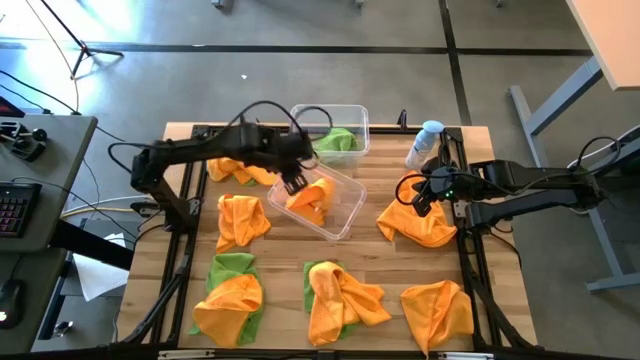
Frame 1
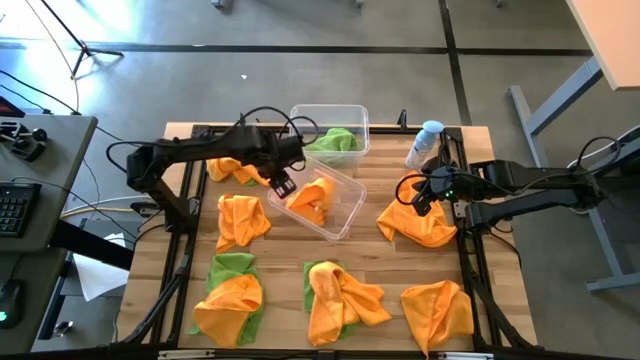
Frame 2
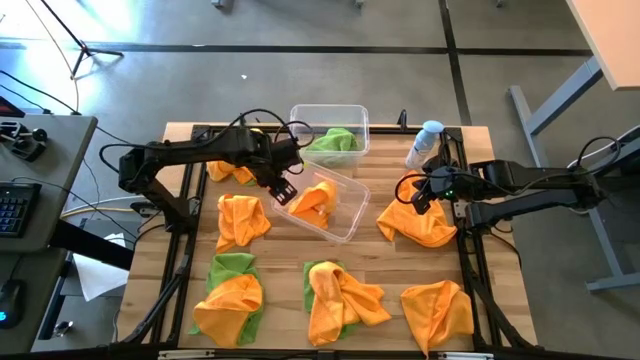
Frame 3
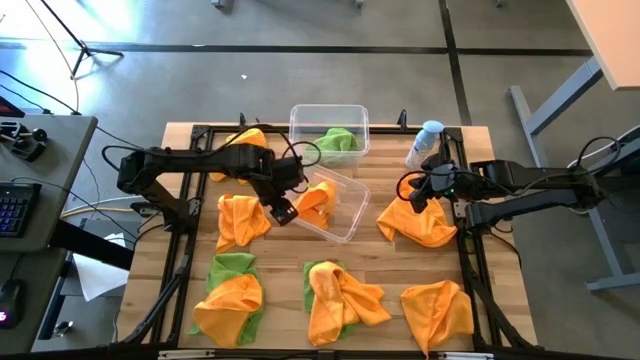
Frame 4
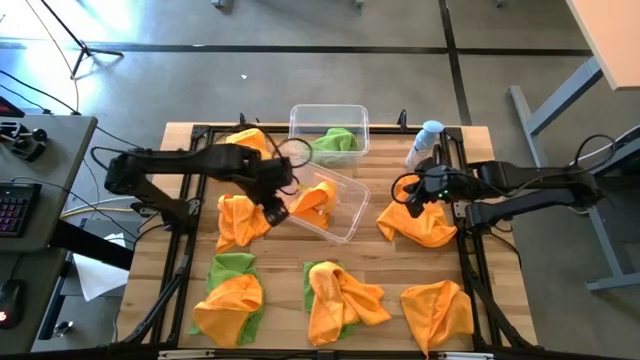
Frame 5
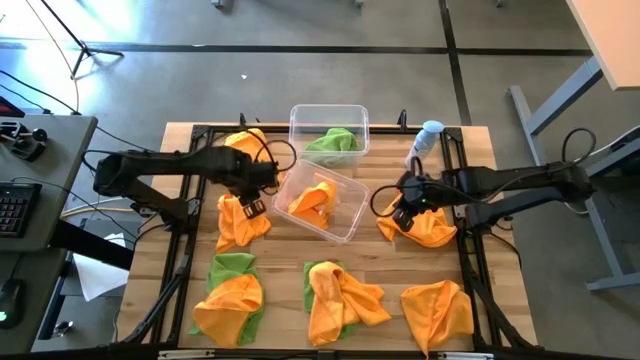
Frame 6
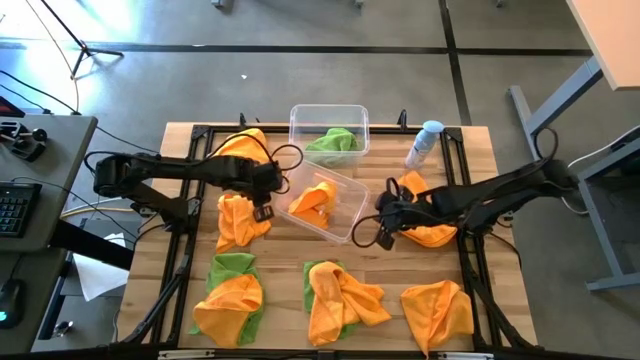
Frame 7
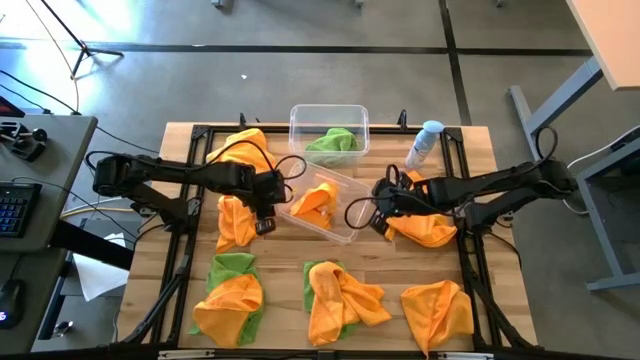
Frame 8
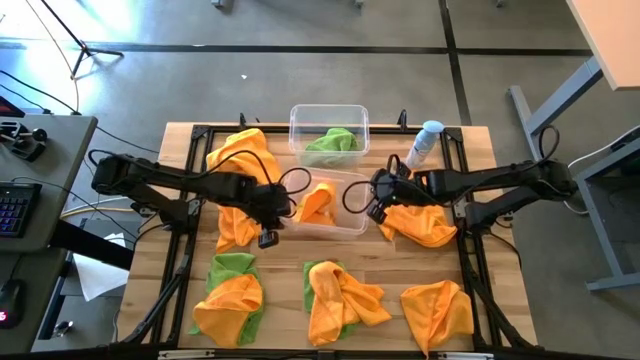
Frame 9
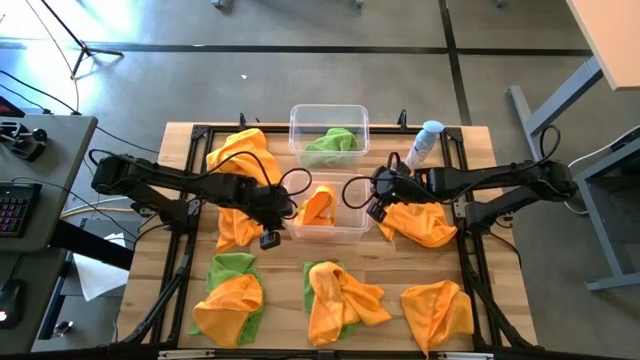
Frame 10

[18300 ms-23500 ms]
Task: Sort microfiber towel by color & place in baskets
Adjust the bottom transparent bin on the table

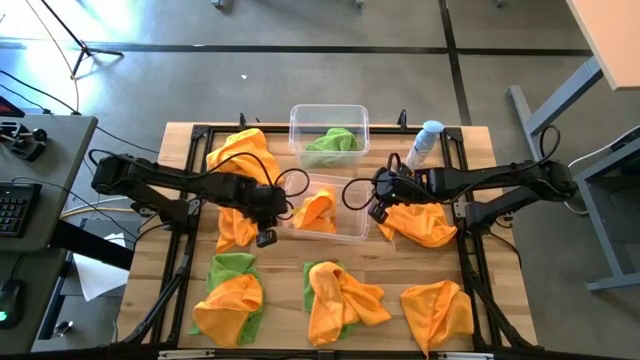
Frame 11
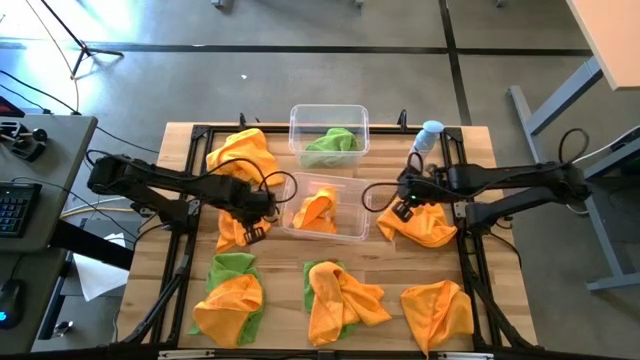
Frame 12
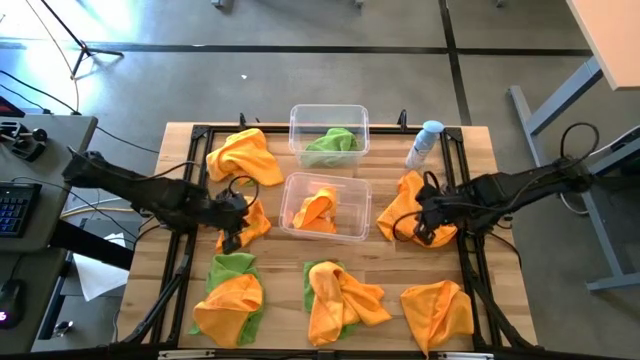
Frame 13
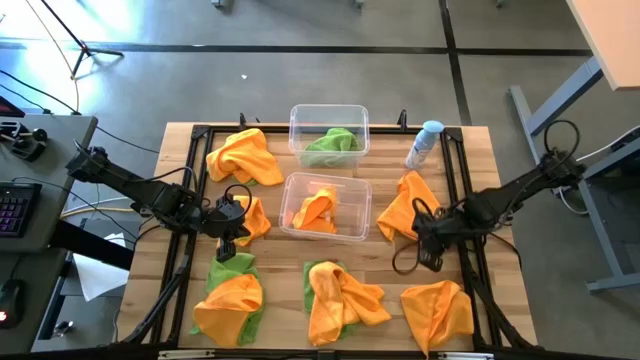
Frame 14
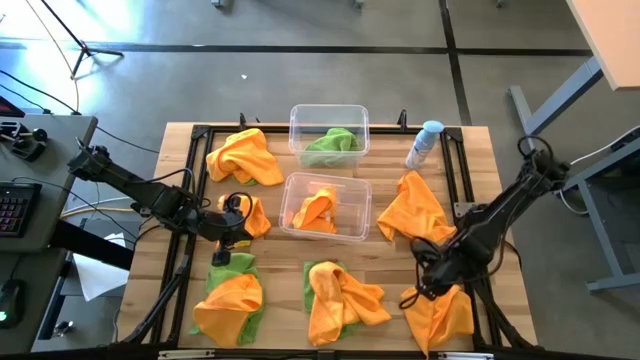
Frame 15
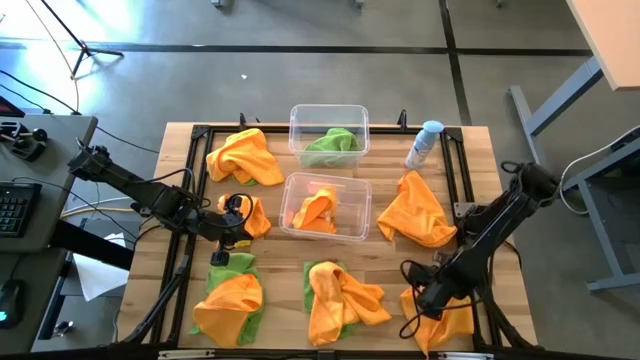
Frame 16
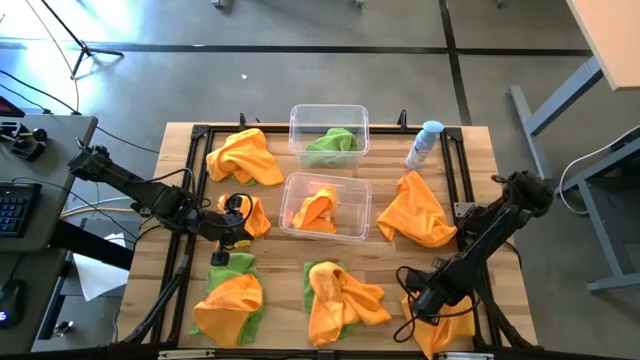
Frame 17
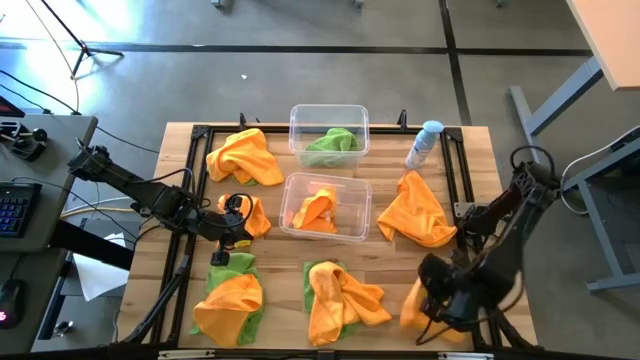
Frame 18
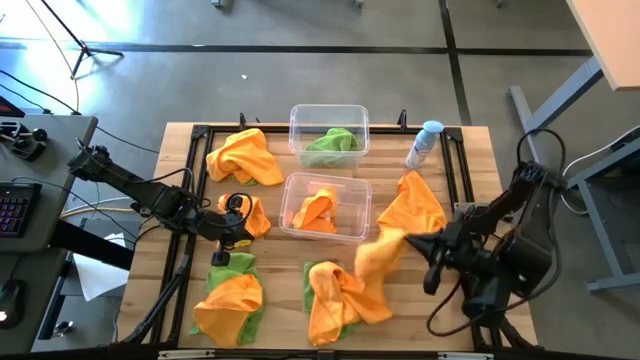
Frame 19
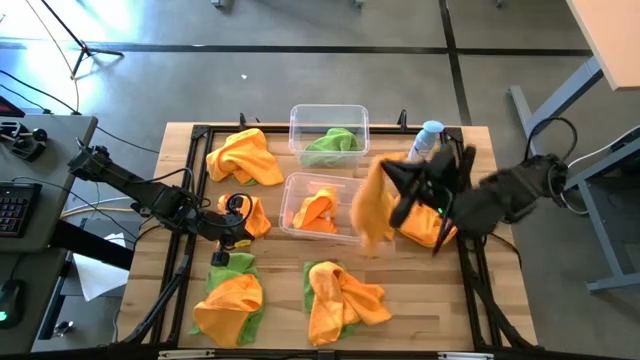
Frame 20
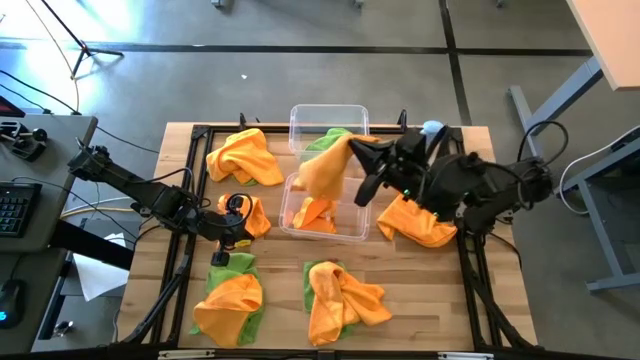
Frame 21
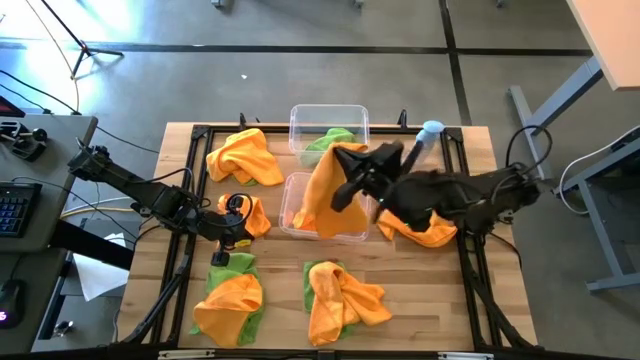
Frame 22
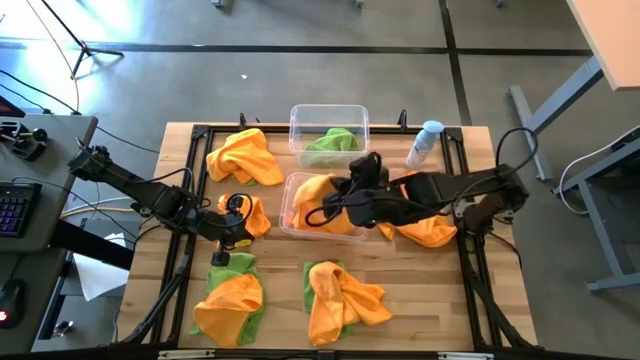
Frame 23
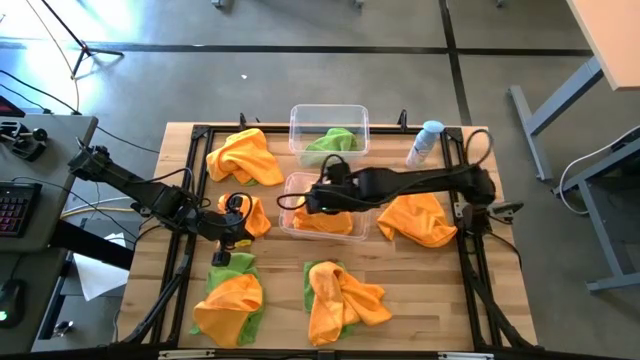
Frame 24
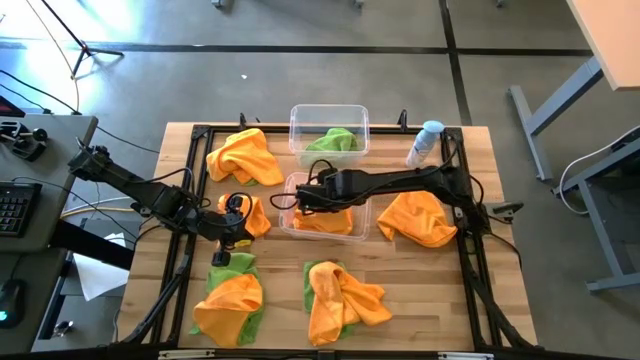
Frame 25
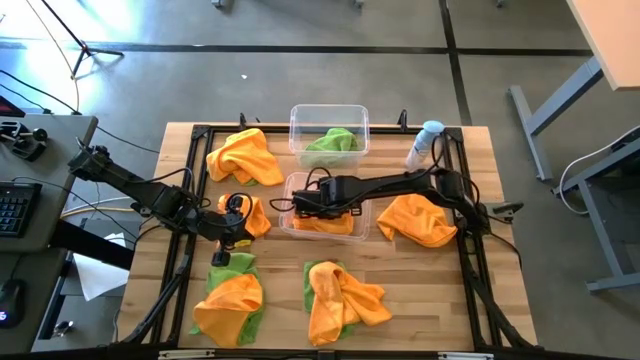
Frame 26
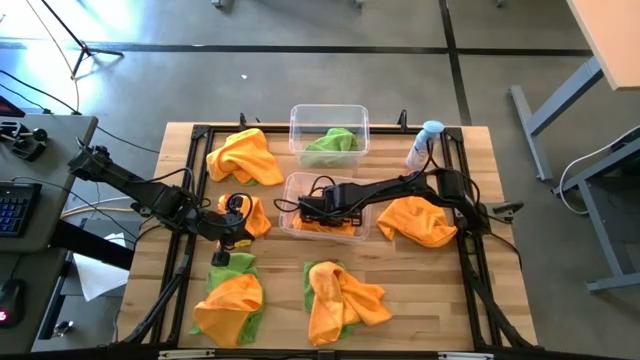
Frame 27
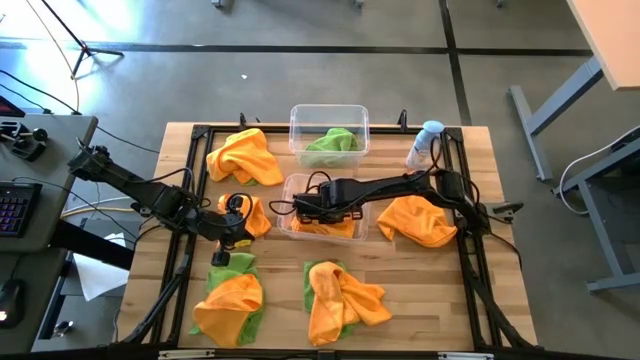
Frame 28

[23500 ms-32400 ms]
Put the orange microfiber towel into the bottom transparent bin

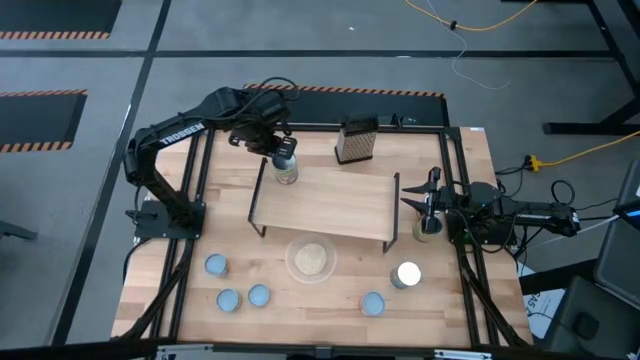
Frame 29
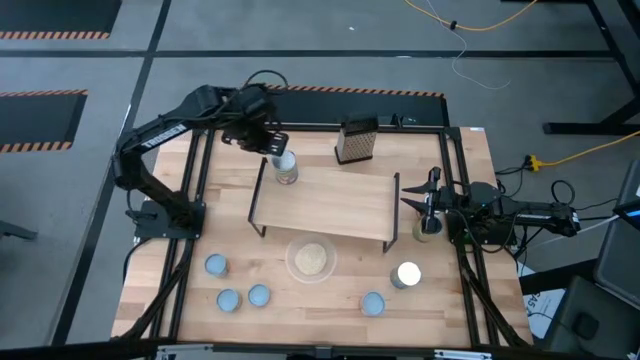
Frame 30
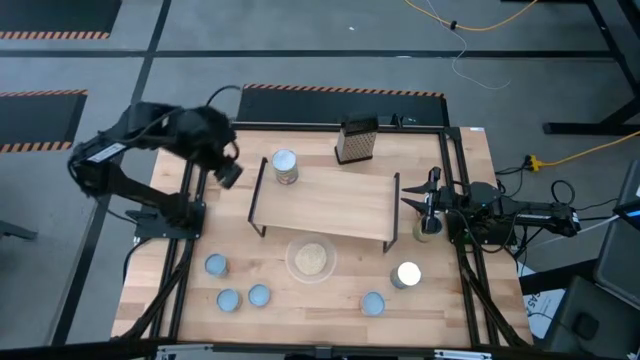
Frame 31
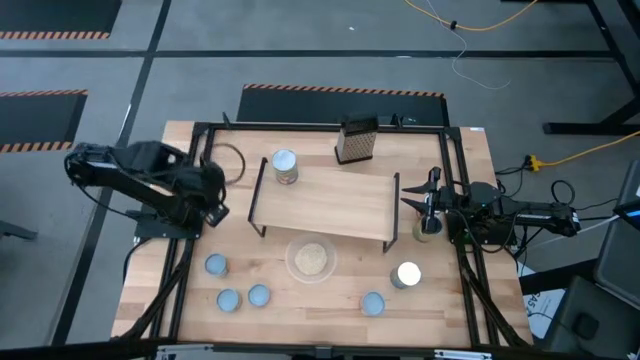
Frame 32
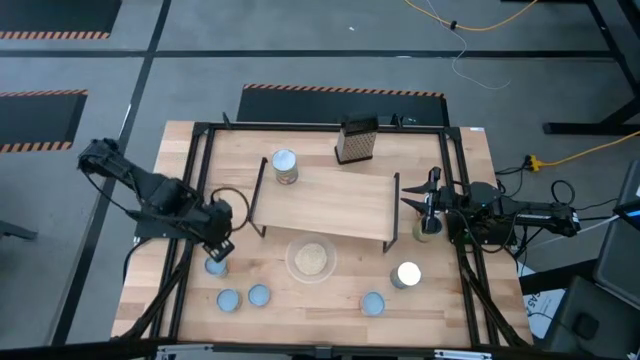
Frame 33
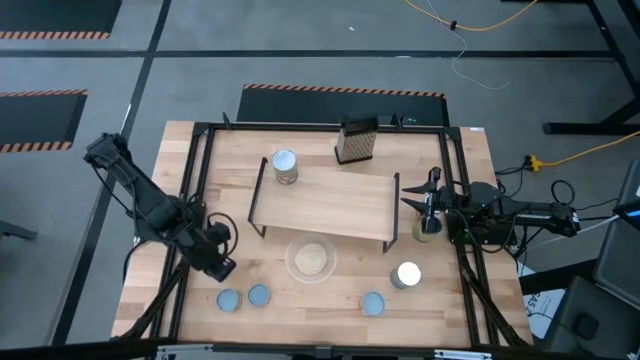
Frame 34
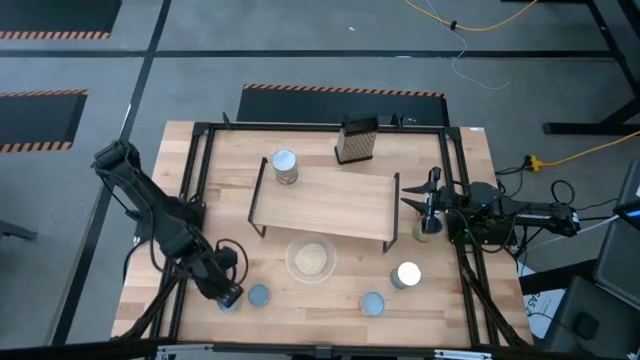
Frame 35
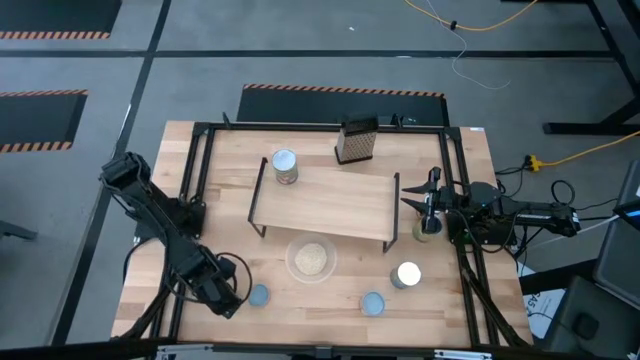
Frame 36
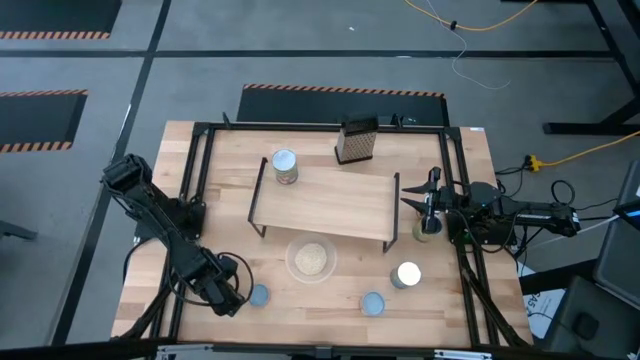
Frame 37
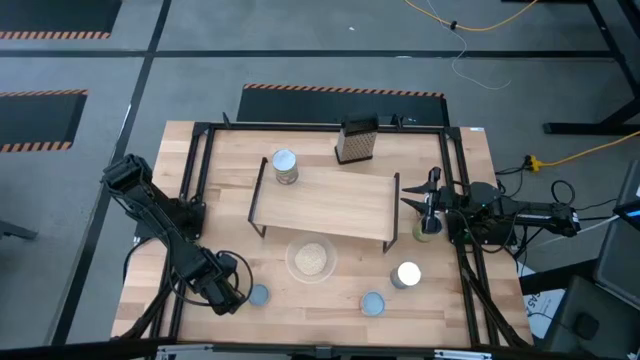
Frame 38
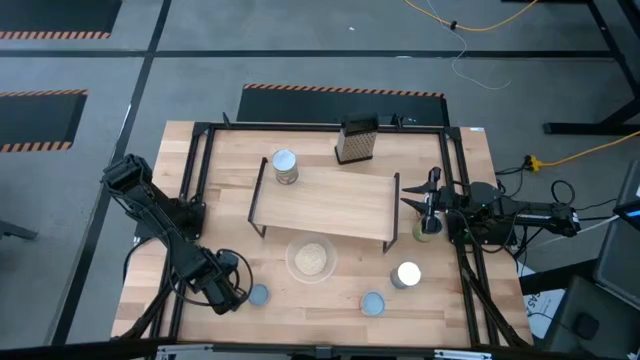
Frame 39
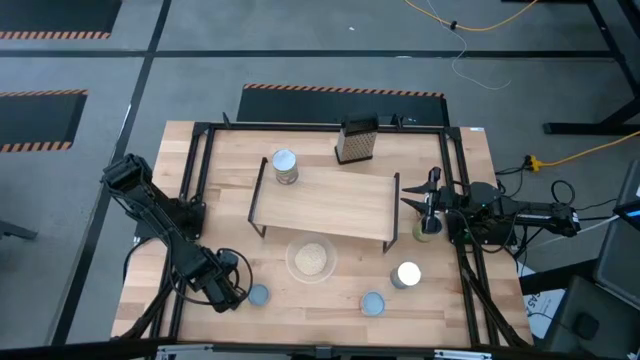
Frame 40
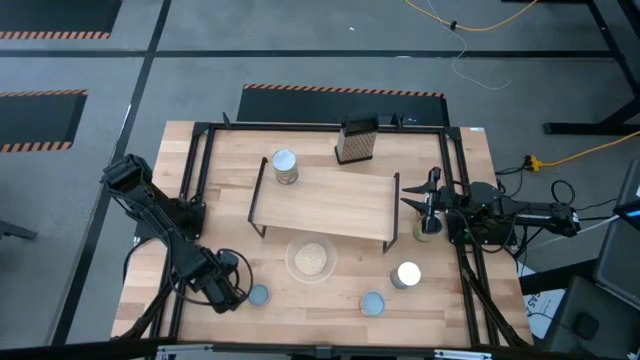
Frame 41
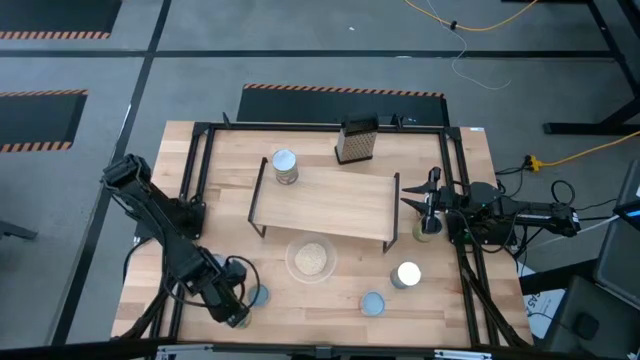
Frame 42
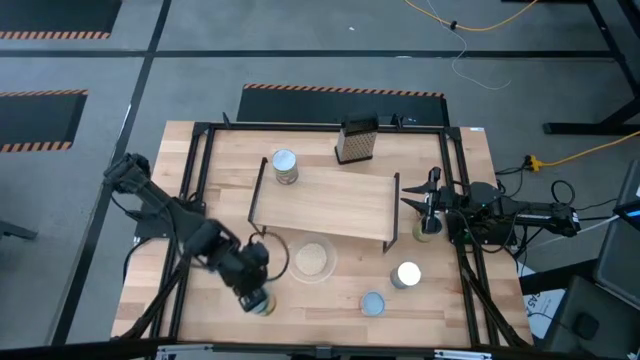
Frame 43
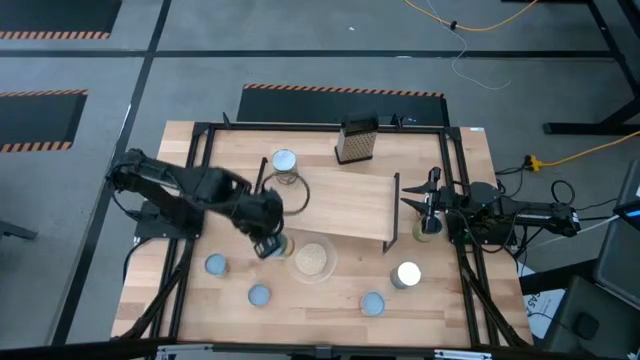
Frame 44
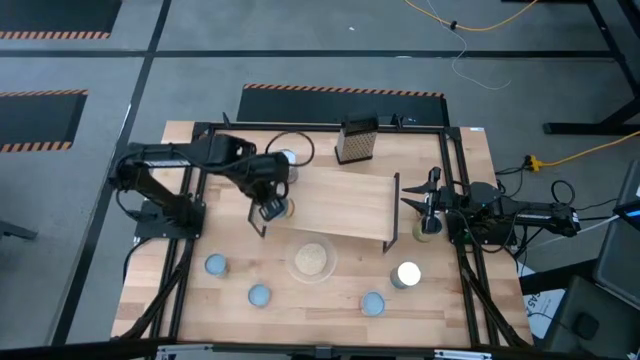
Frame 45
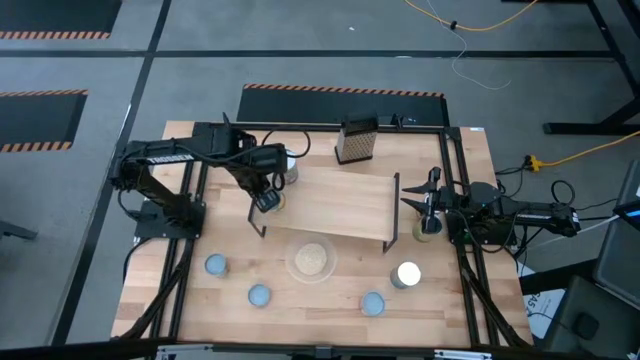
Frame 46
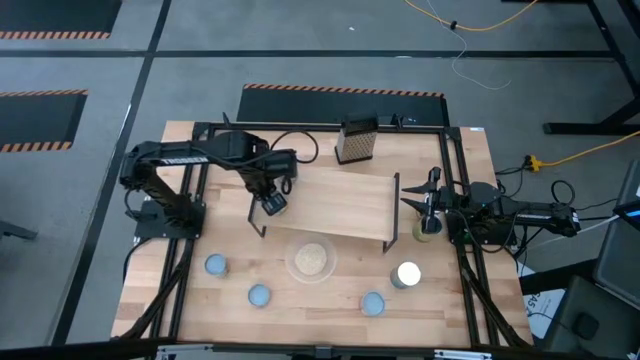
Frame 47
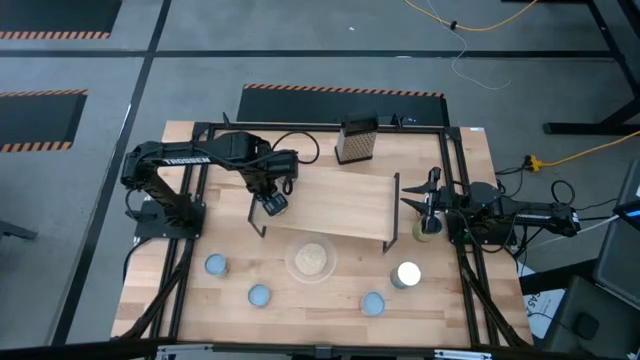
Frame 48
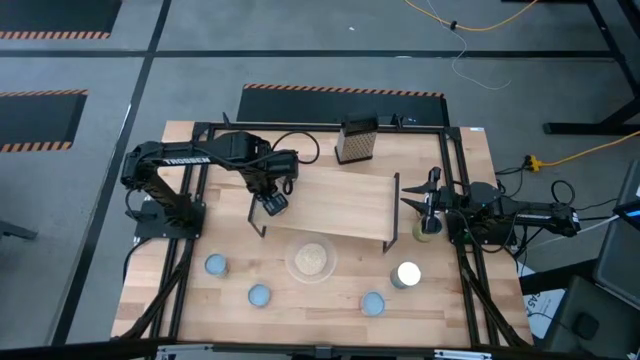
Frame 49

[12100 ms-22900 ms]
Task: Pick and place cans onto a shelf
Put the small canned peaches on the shelf
